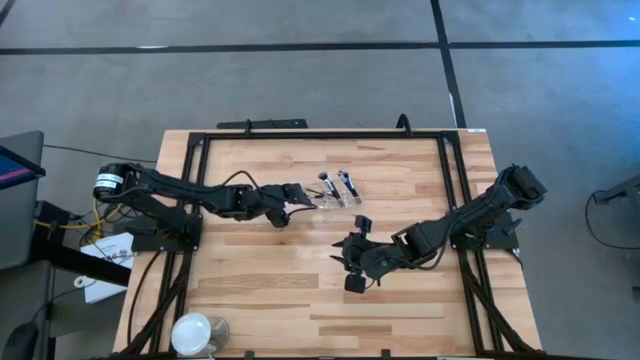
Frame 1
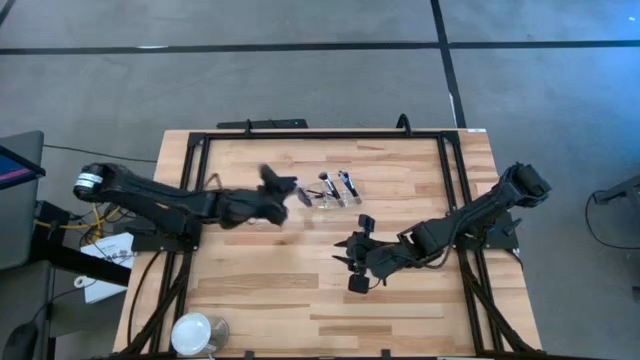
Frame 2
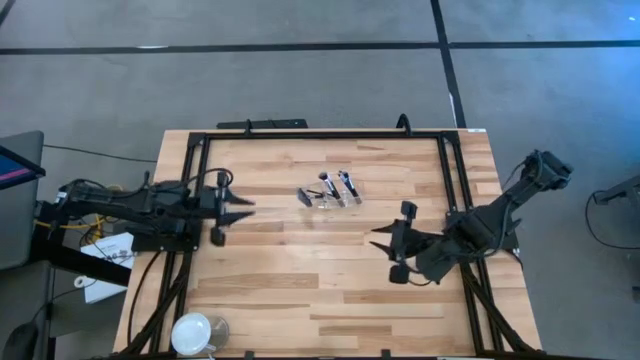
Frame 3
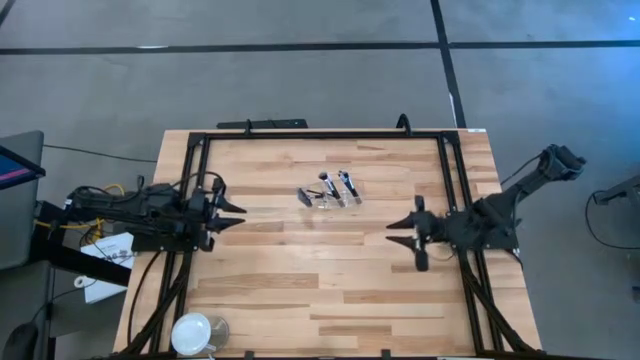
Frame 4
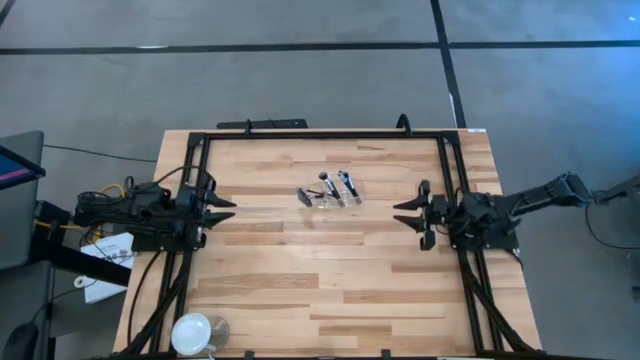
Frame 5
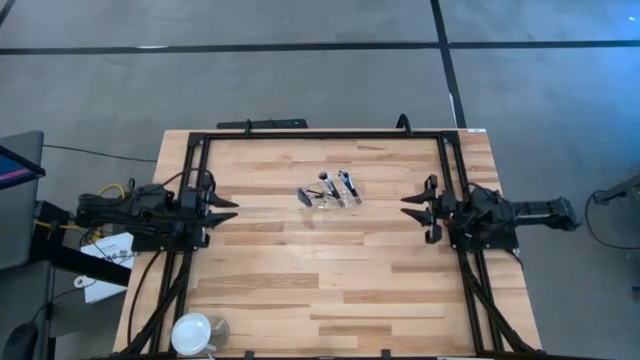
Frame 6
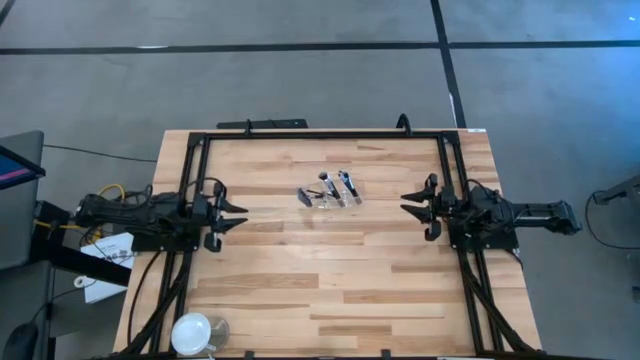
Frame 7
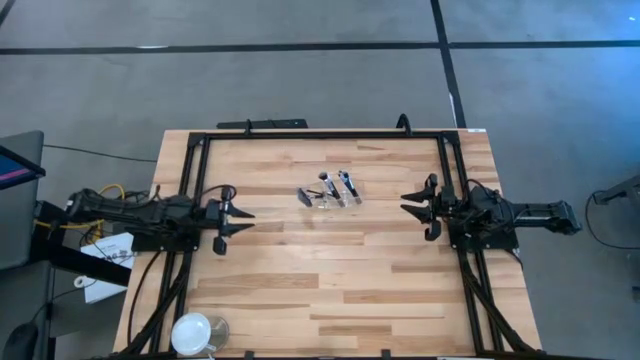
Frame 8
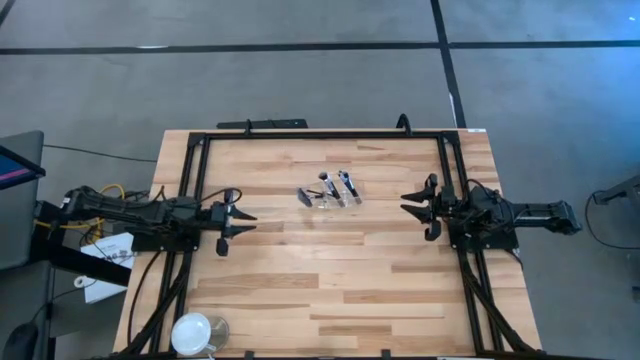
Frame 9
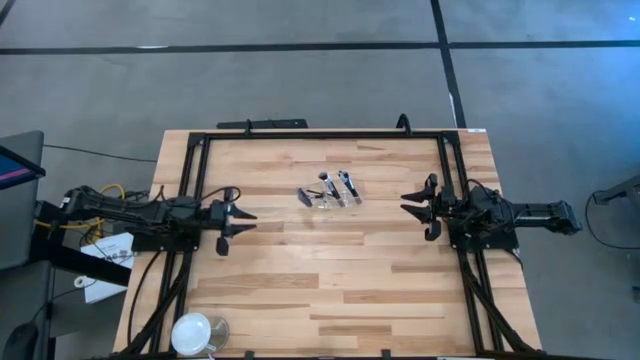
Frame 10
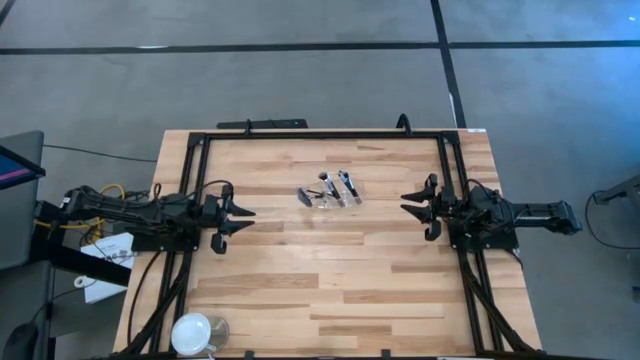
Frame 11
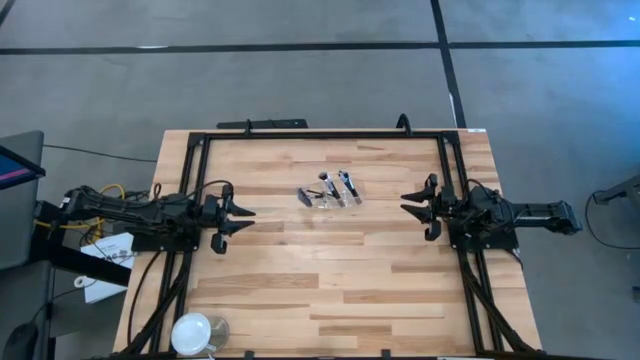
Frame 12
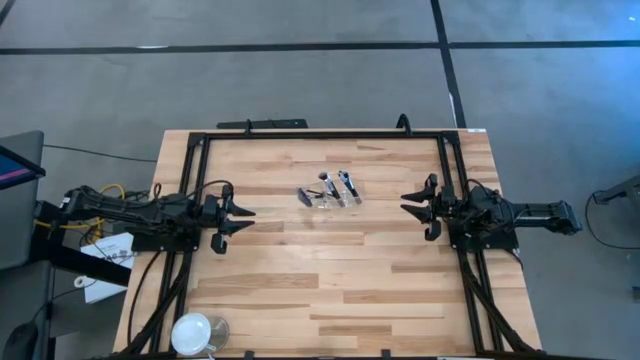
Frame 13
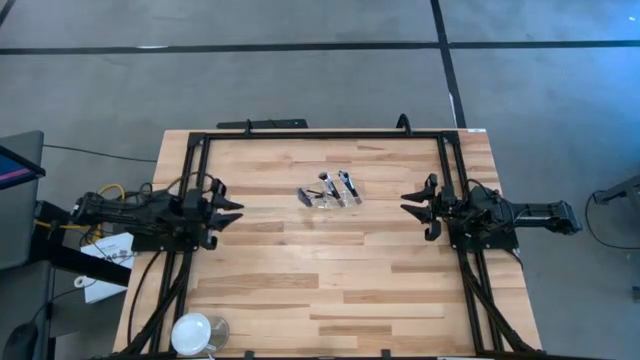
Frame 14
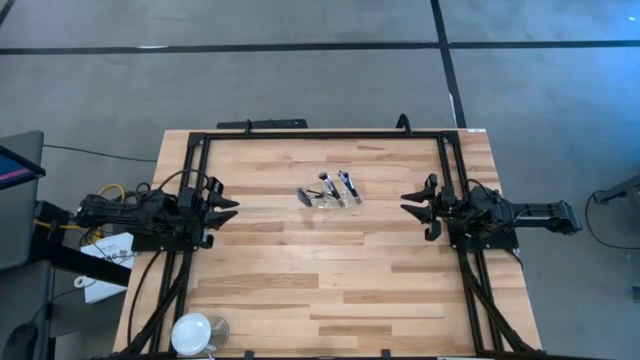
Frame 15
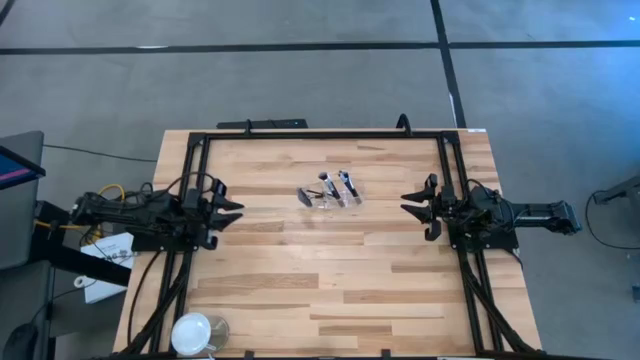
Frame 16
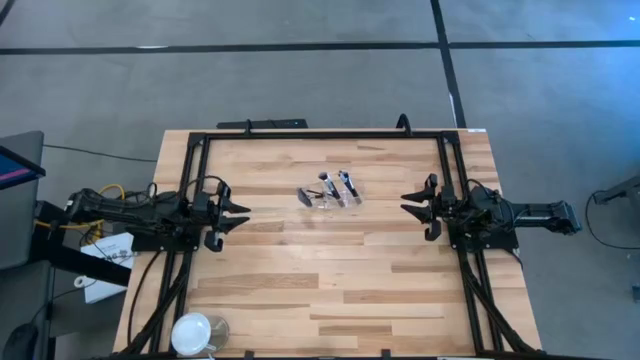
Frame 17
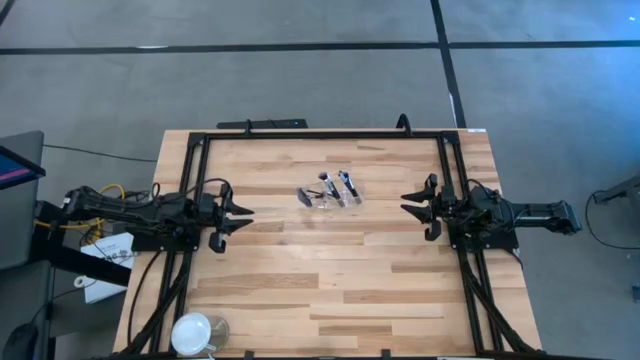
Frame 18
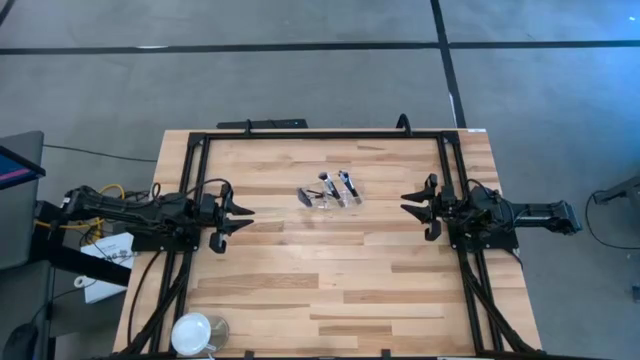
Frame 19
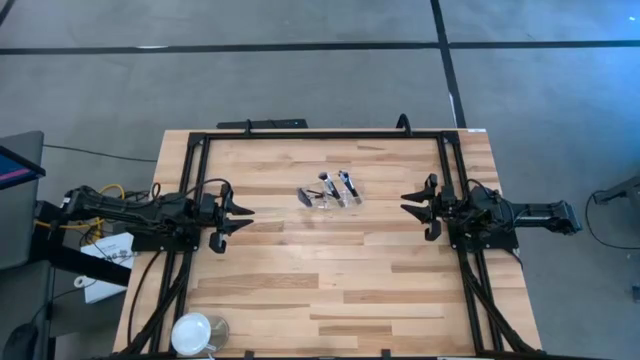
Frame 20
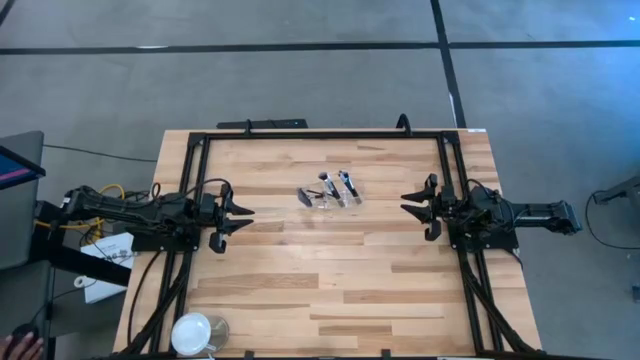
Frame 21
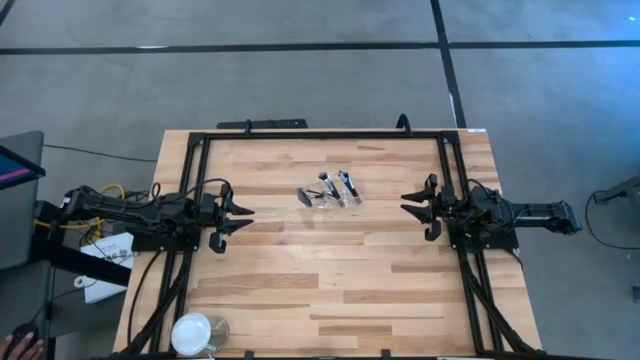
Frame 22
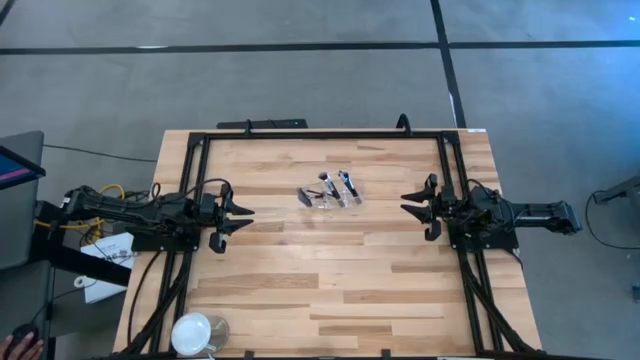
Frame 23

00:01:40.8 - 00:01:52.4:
Task: Put items in baskets/containers
Return to Home Position

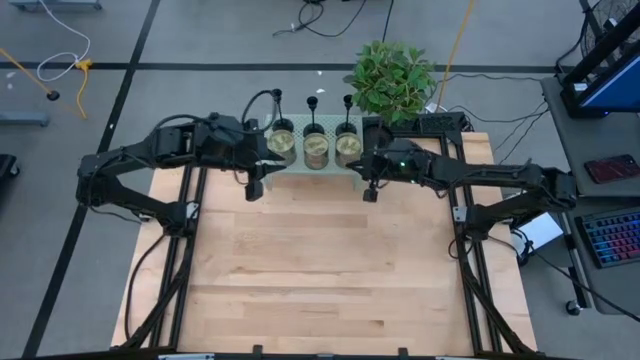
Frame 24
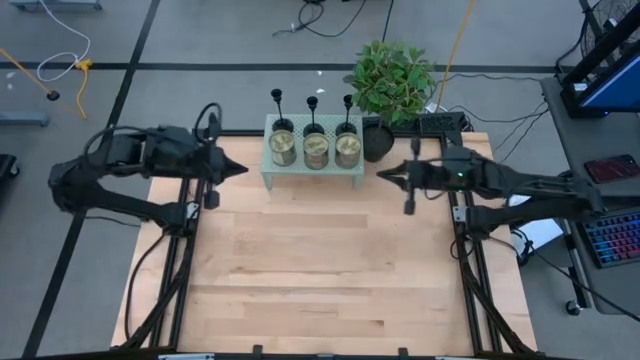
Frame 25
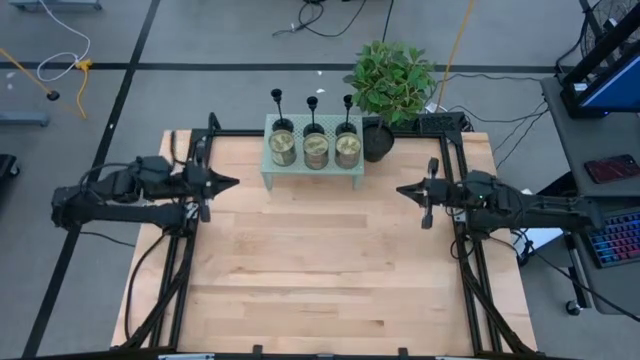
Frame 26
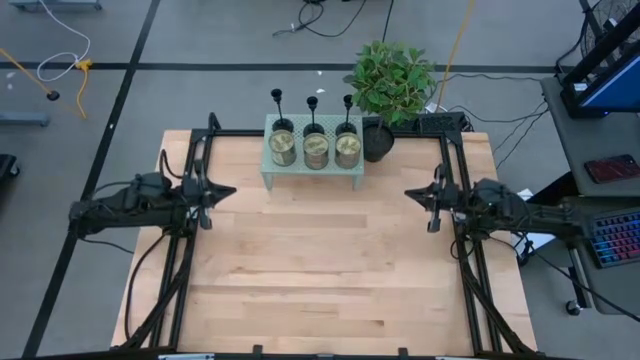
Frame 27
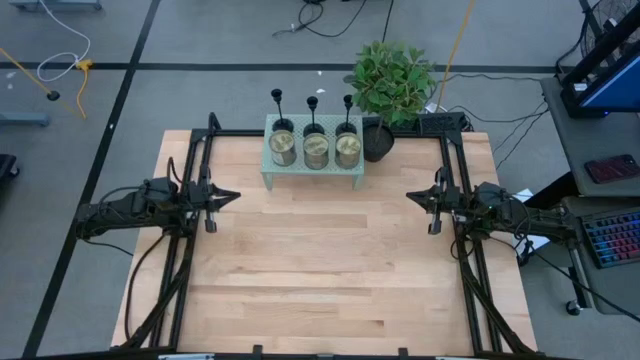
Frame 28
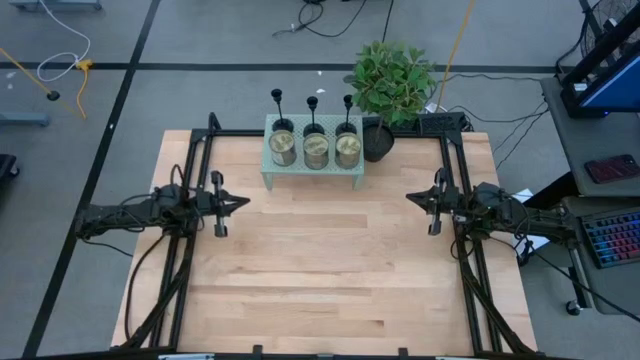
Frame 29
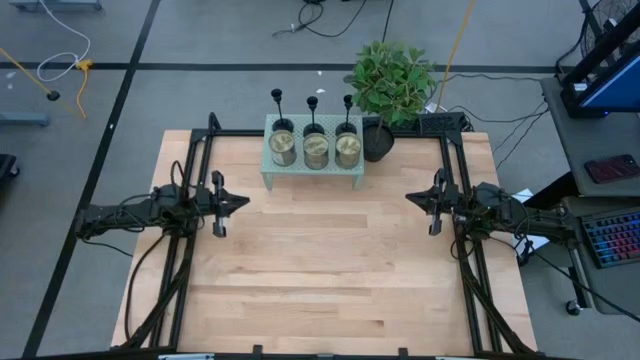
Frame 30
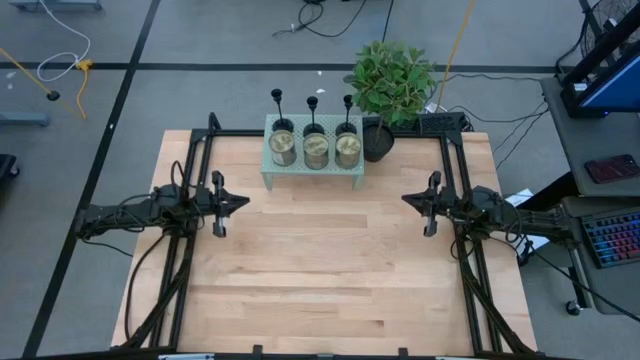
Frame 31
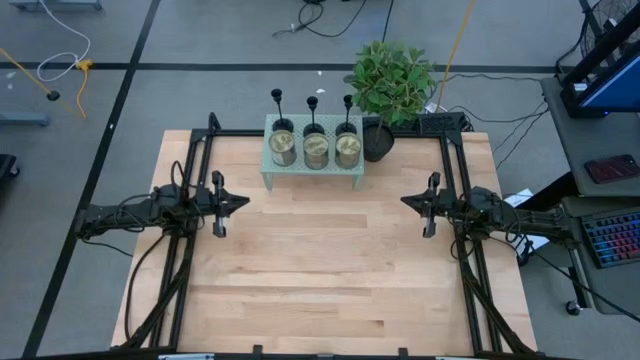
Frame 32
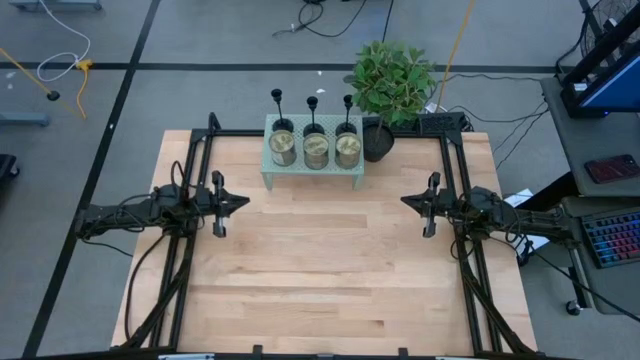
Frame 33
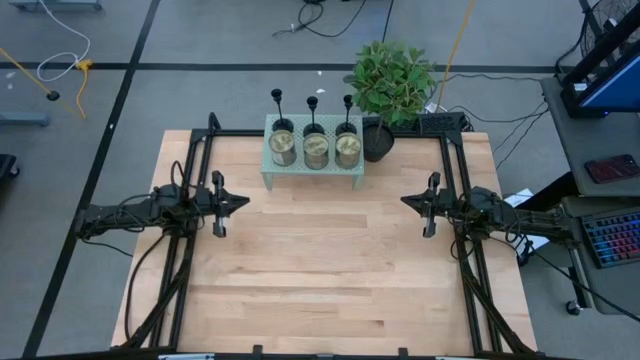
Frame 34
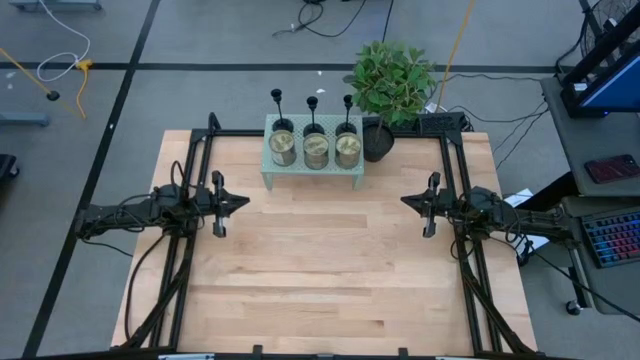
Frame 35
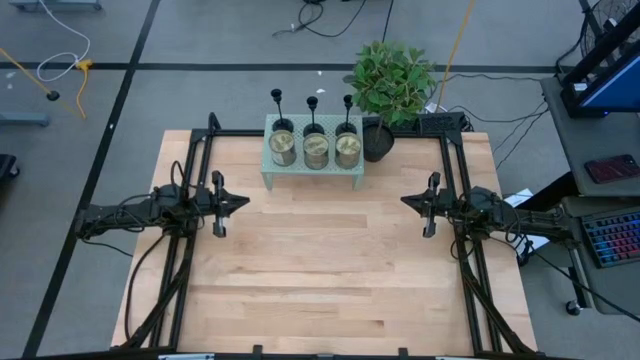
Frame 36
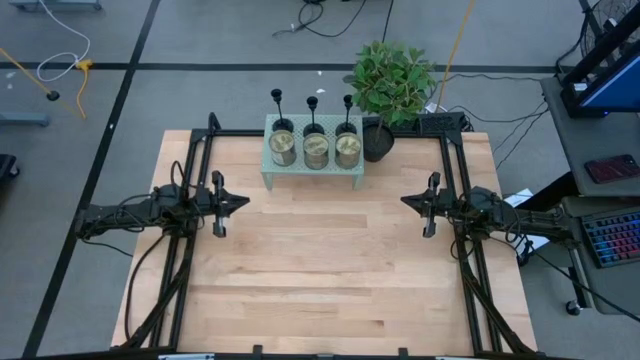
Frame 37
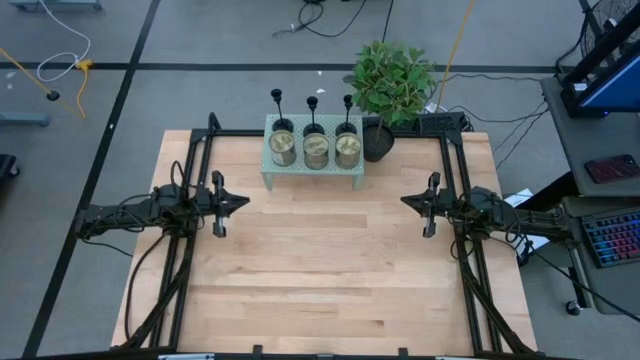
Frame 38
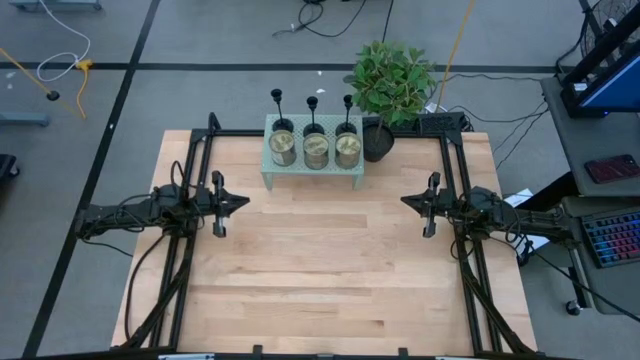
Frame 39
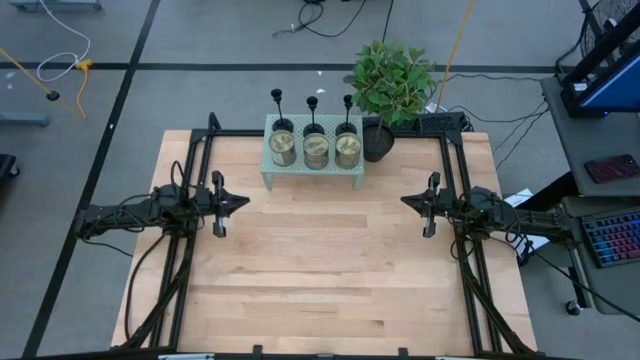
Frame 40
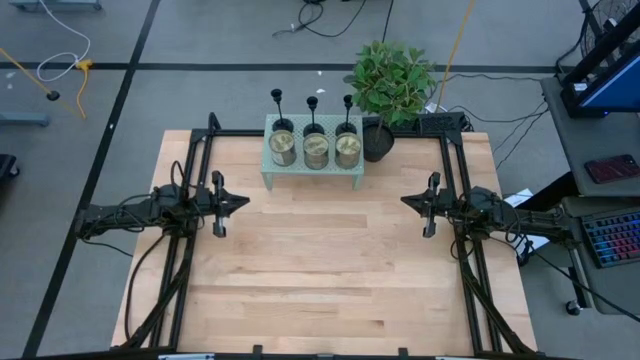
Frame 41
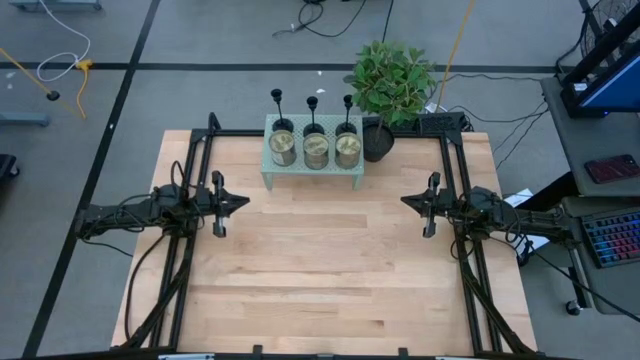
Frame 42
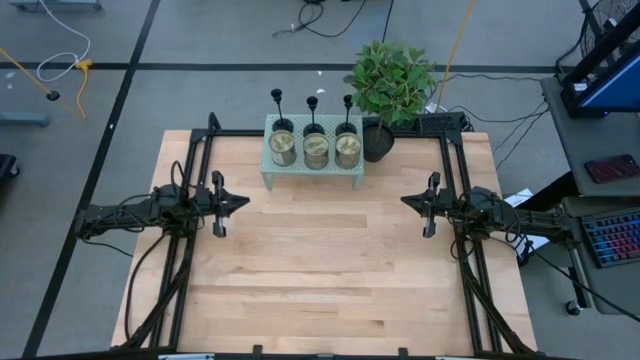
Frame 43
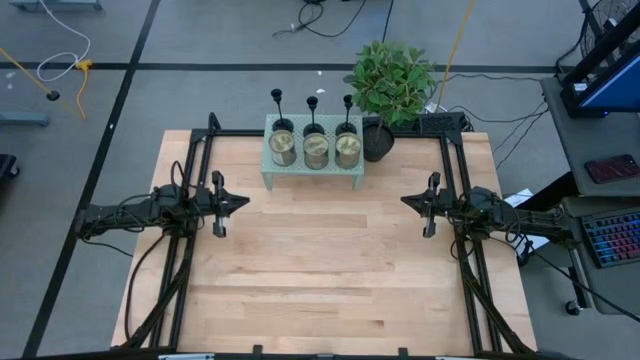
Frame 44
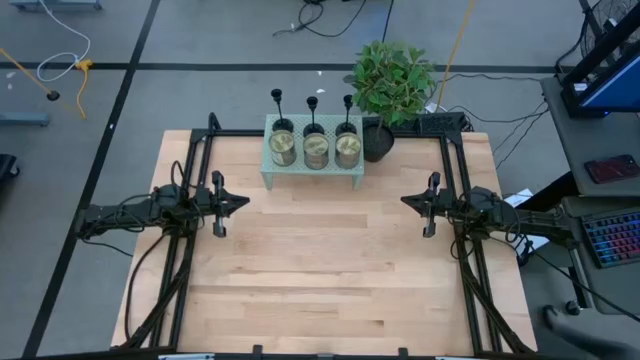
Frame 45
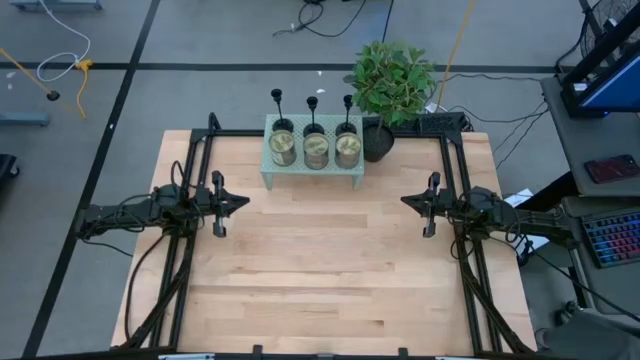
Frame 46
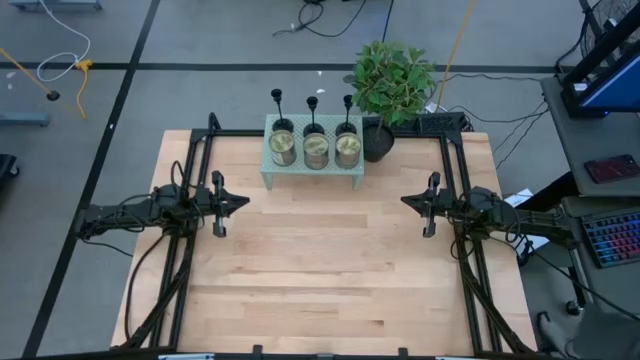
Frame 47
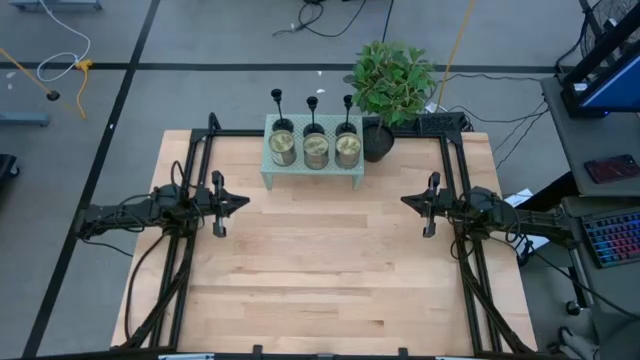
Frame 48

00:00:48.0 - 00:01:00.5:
Task: Pick & Place candle stick holders
Return to Home Position
